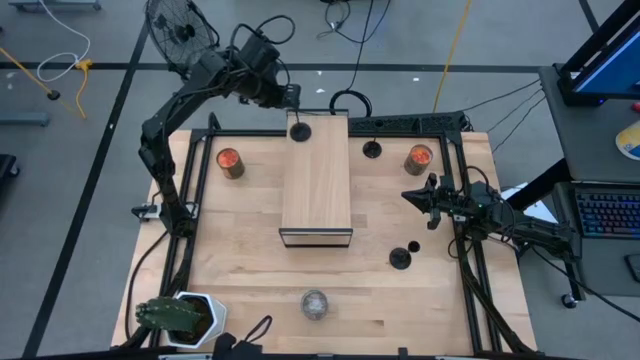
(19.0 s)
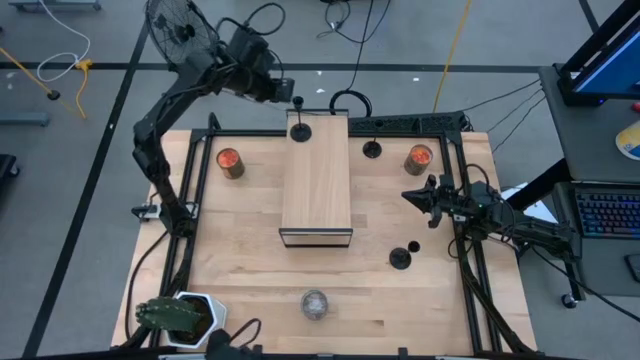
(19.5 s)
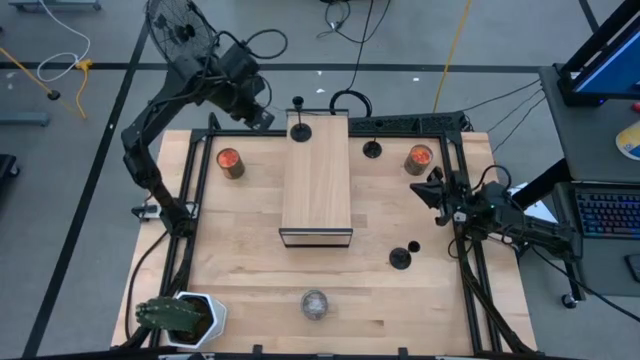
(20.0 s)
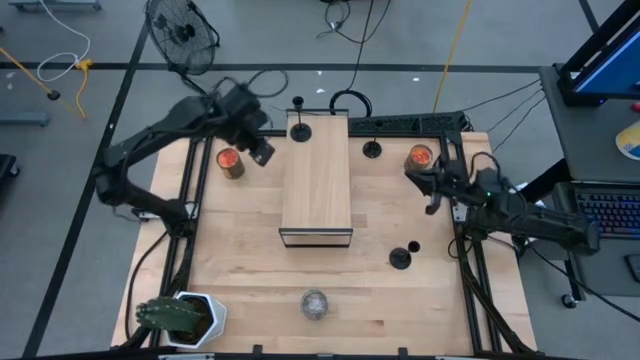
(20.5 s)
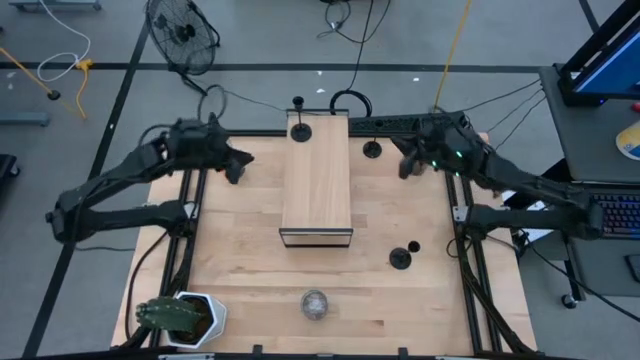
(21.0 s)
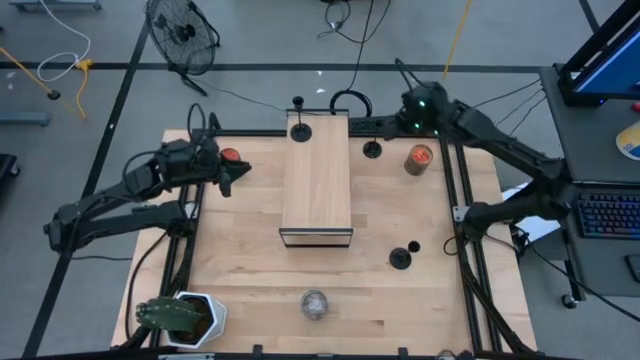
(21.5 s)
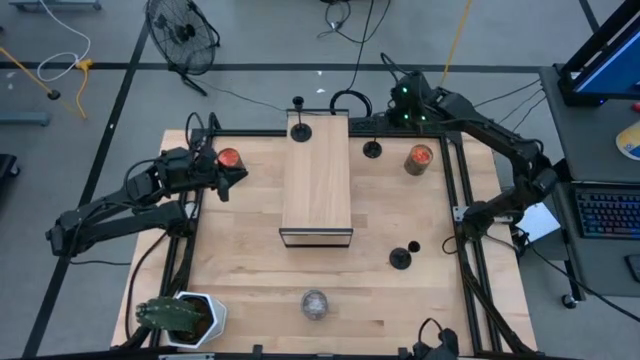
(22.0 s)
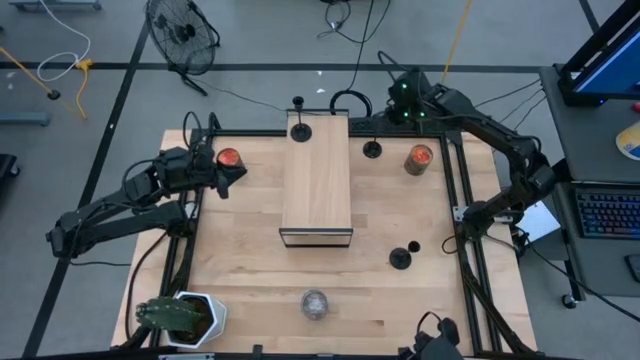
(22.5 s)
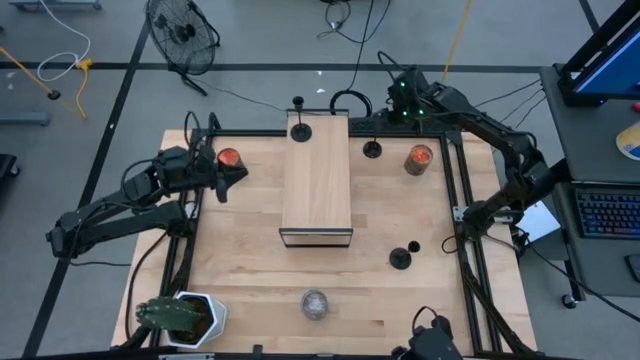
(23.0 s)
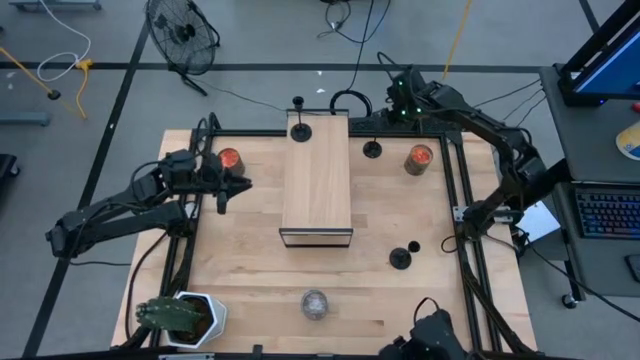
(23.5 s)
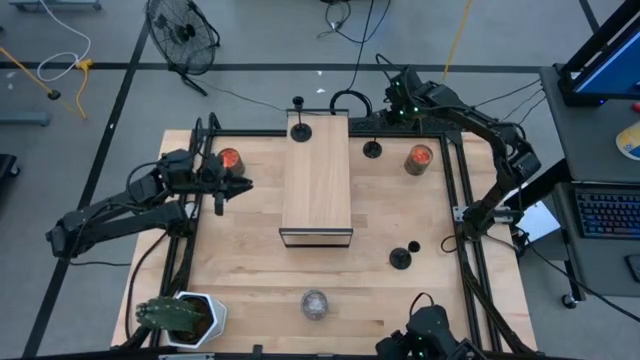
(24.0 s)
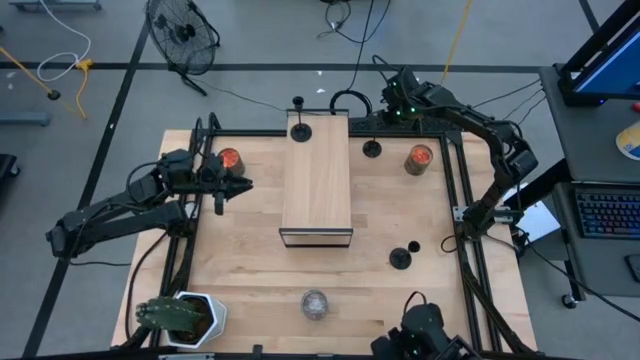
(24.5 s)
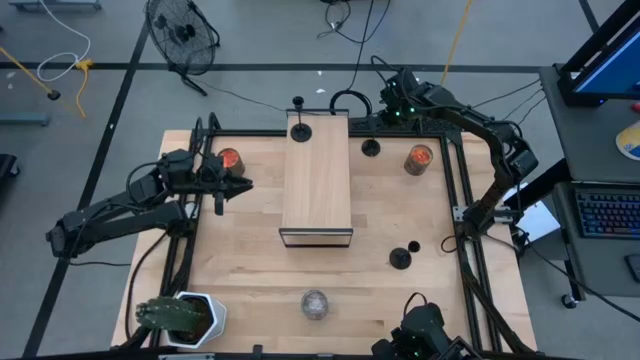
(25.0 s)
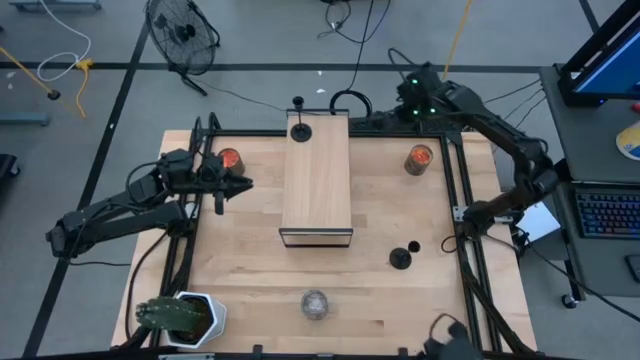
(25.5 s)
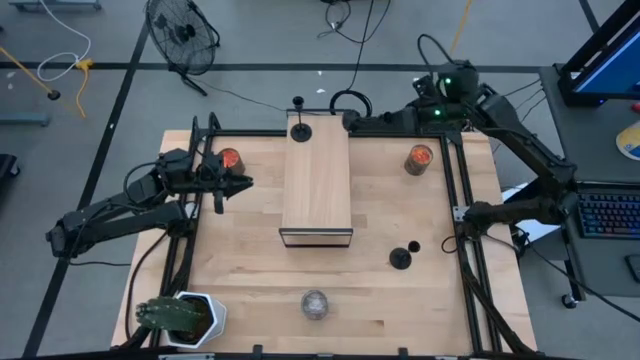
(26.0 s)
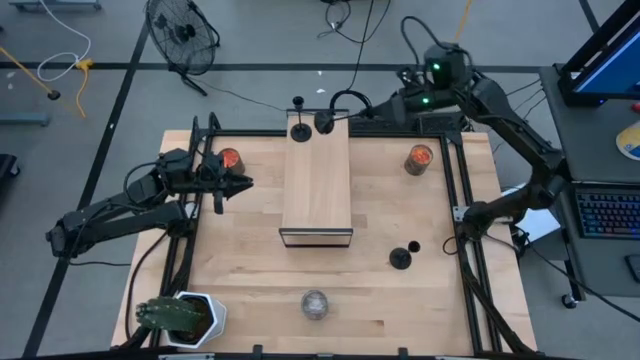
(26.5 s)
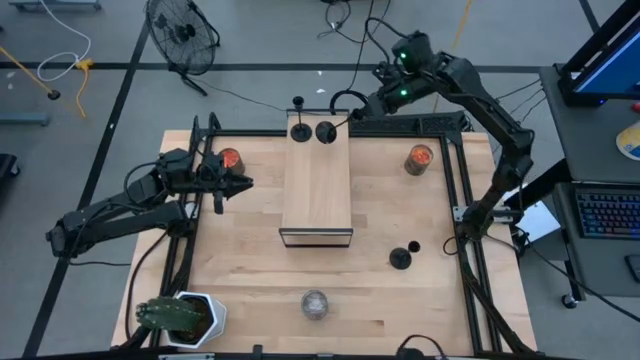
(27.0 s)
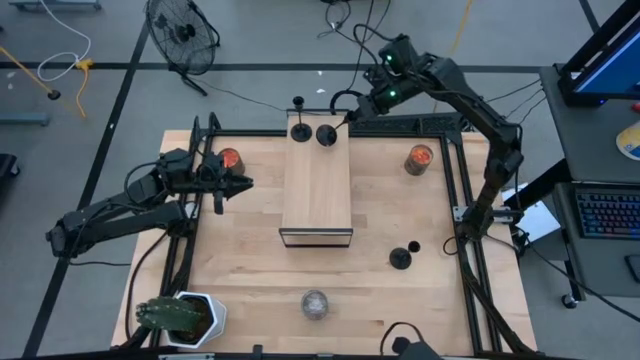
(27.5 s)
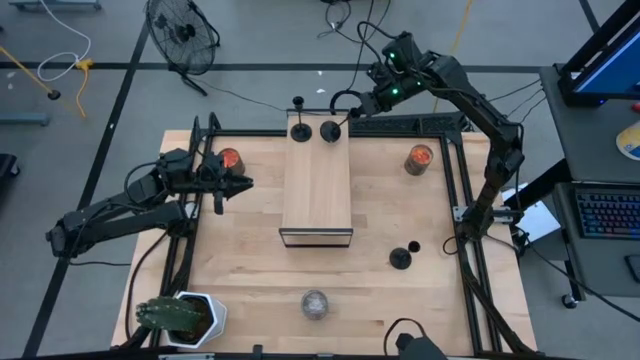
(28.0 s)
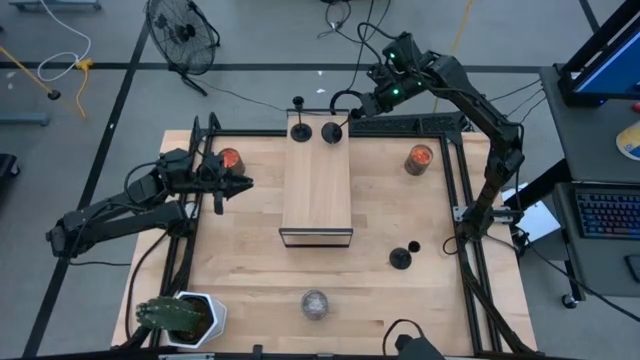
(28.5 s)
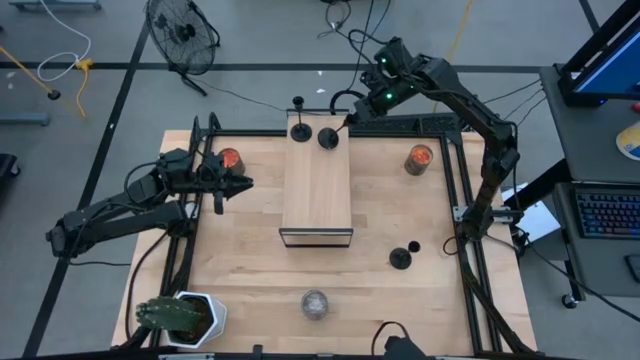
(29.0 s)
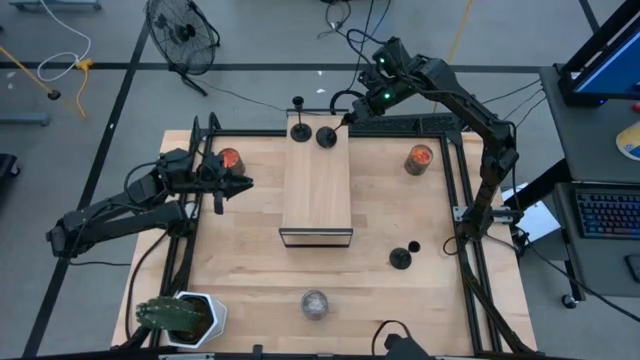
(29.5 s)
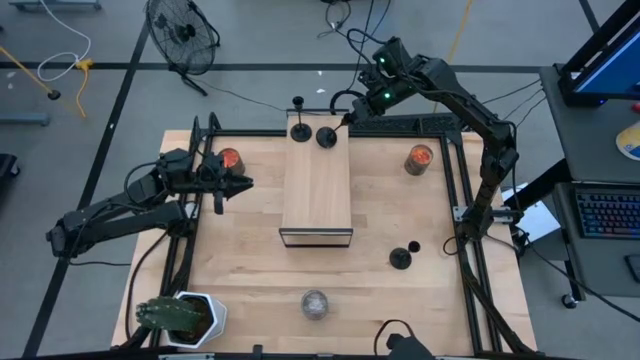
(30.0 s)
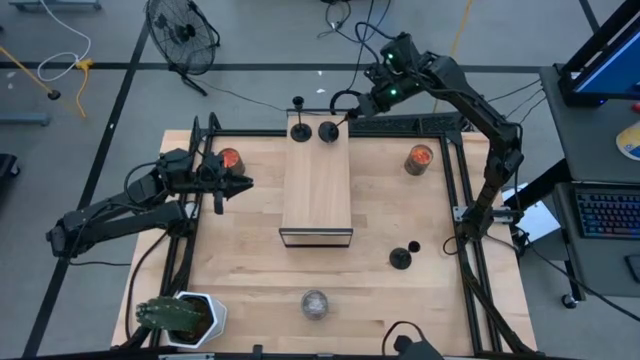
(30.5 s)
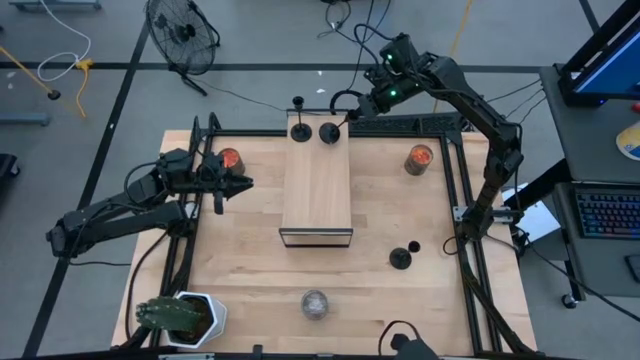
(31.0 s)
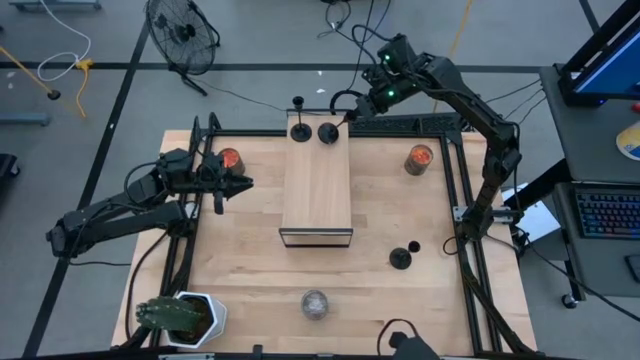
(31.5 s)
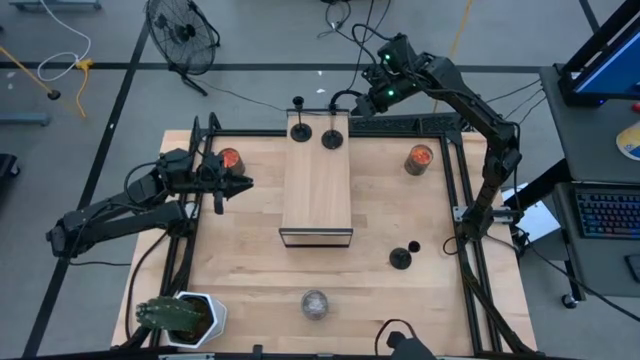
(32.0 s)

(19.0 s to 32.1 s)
Task: Pick & Place candle stick holders
Put the top black candlestick holder on the shelf

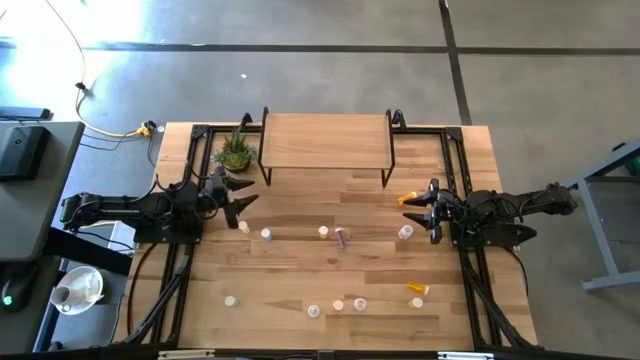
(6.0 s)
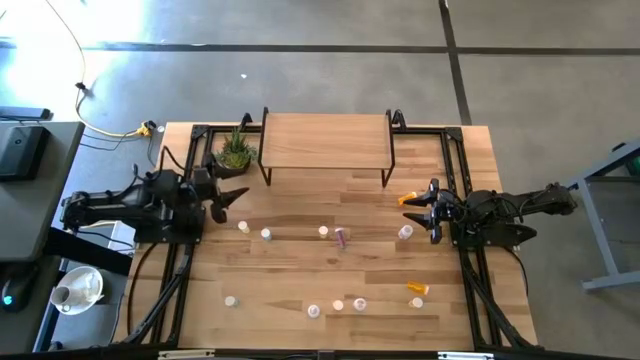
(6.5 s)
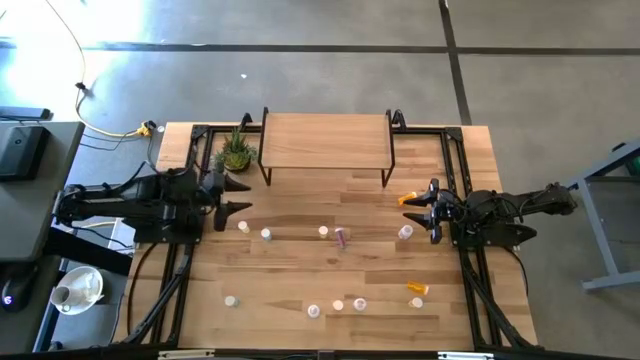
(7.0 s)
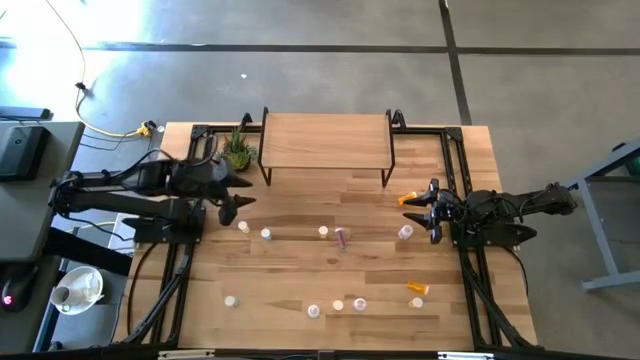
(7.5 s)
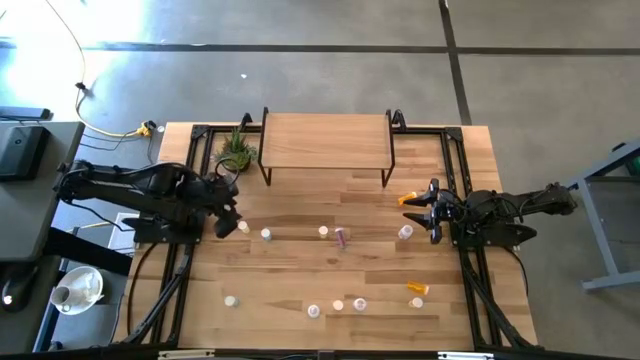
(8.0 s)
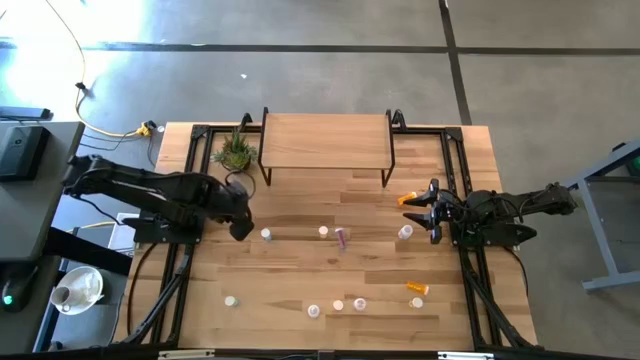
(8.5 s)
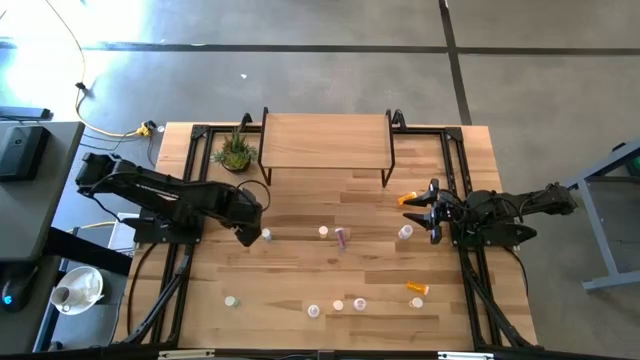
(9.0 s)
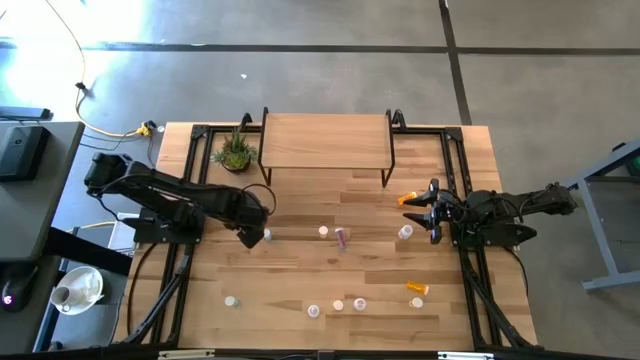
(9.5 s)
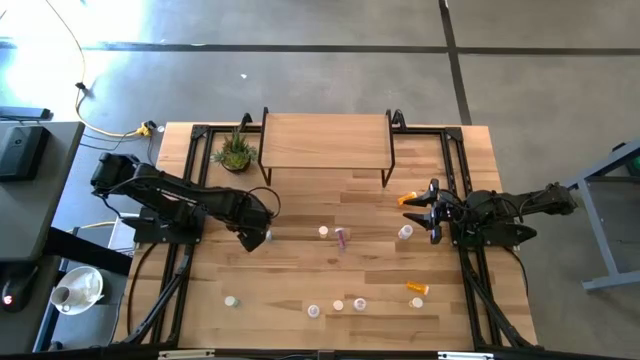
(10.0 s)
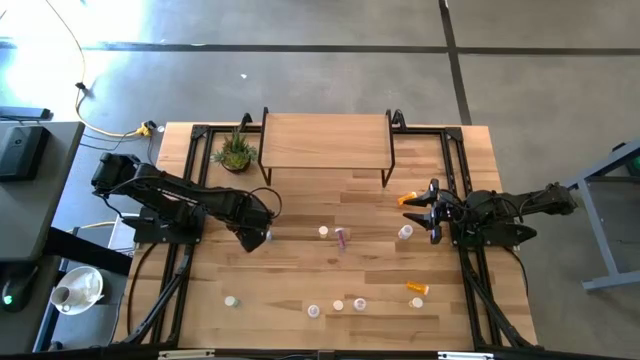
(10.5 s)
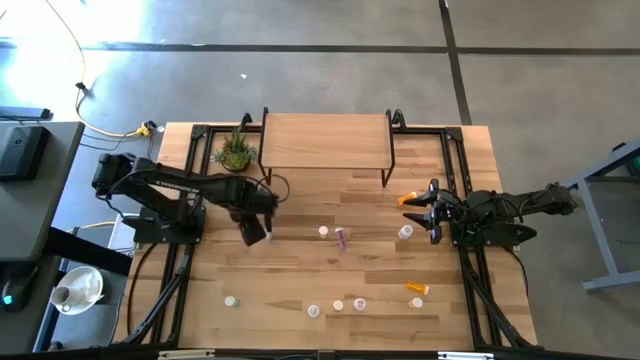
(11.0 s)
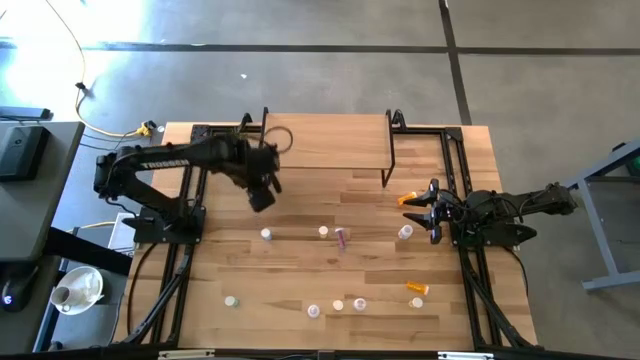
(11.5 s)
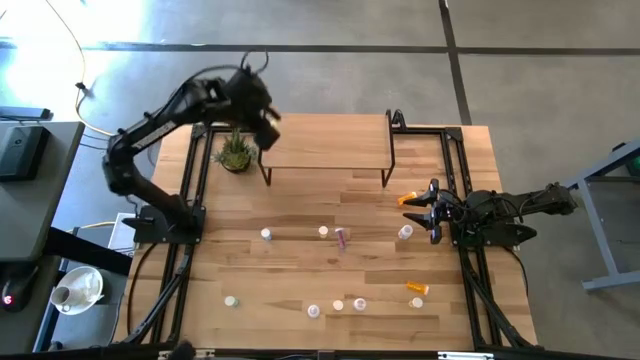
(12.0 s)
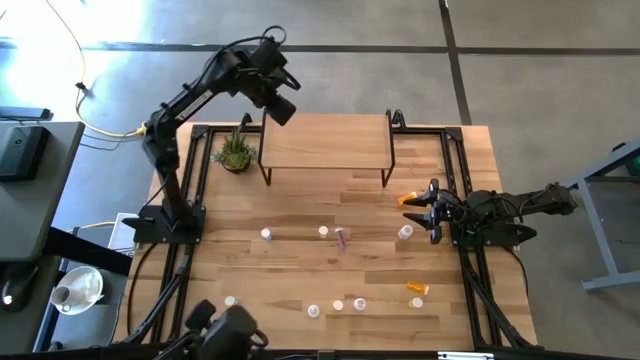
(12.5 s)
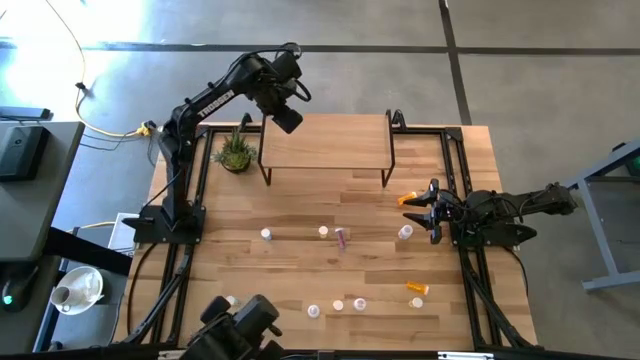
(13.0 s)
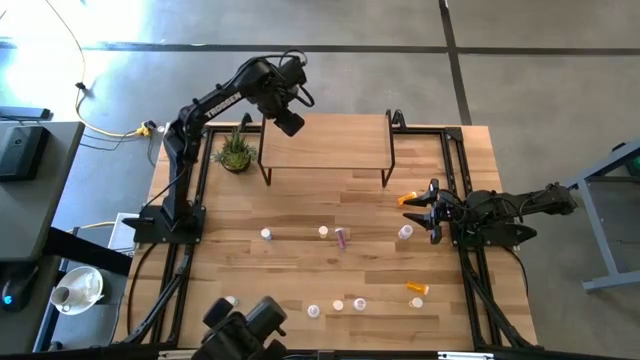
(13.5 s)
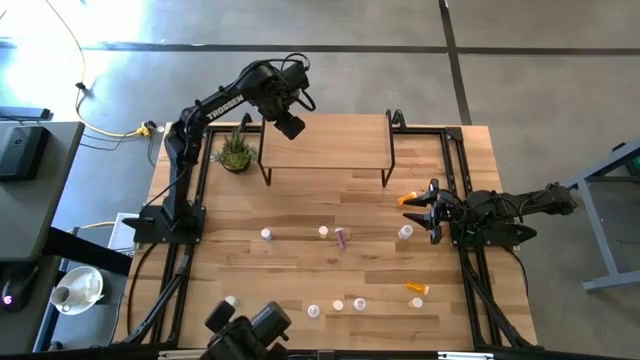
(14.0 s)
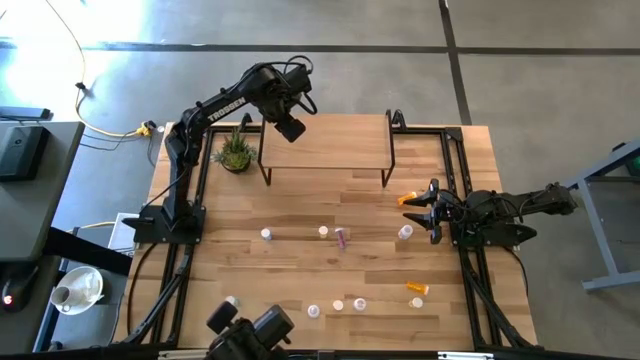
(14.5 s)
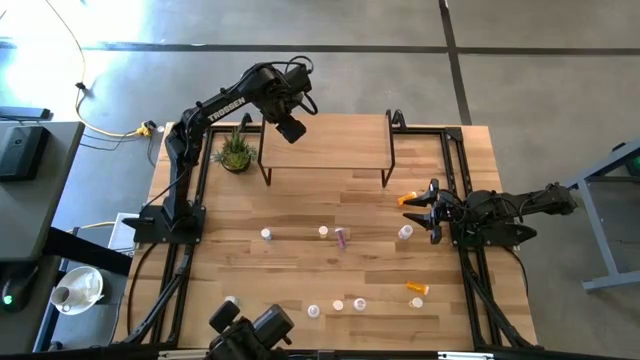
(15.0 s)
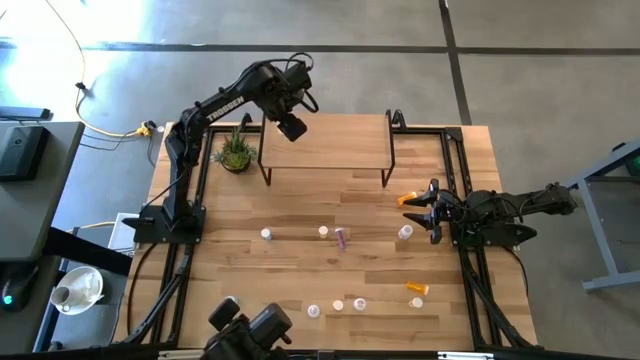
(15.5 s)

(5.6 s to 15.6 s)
Task: Pick and place medicine bottles onto shelf by color
Put the top left yellow pill bottle on the shelf
